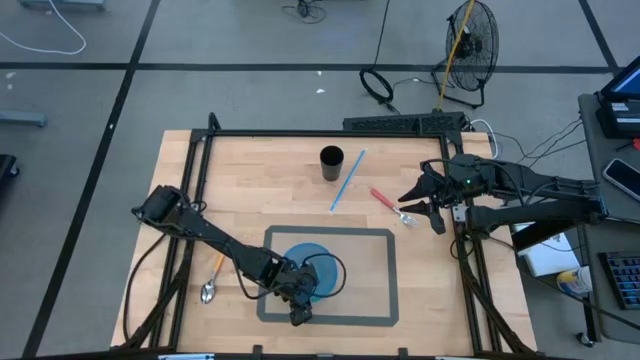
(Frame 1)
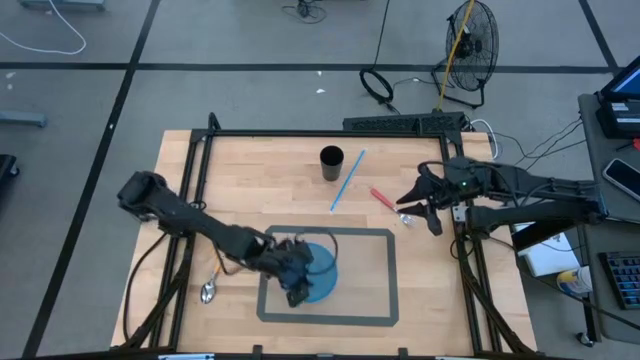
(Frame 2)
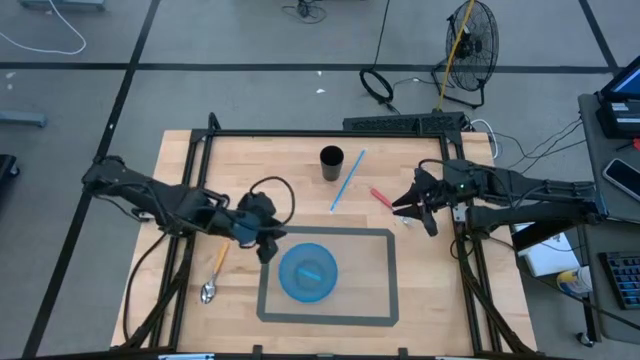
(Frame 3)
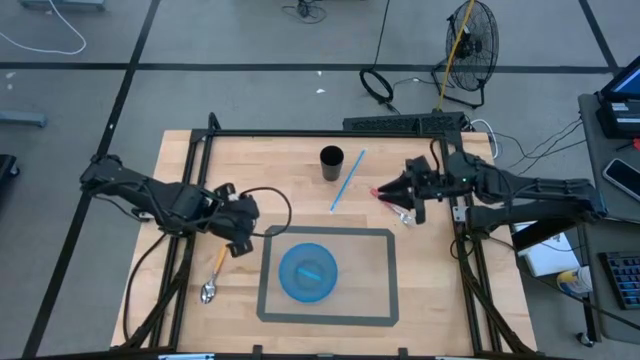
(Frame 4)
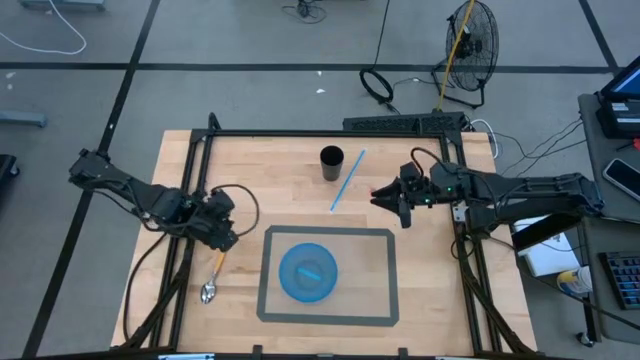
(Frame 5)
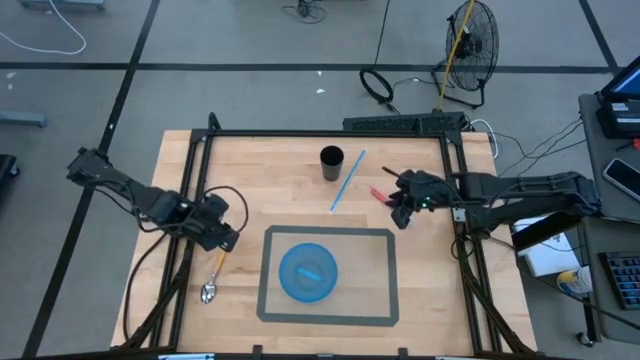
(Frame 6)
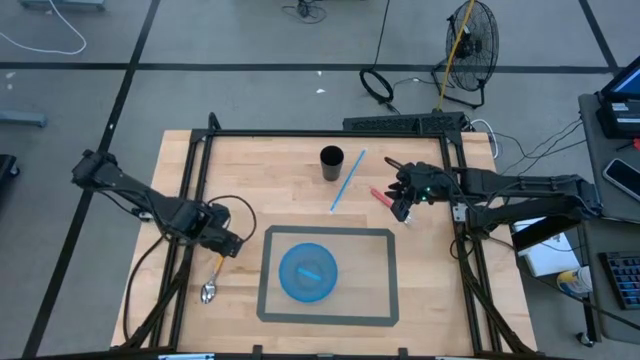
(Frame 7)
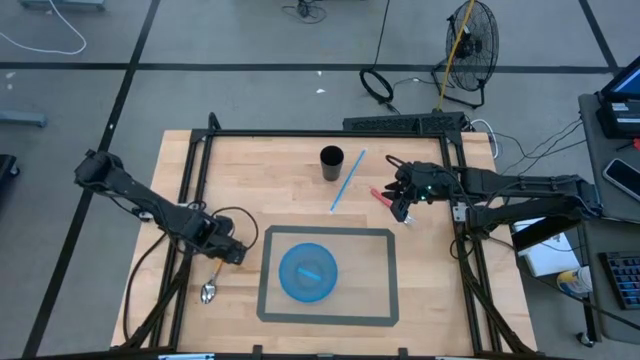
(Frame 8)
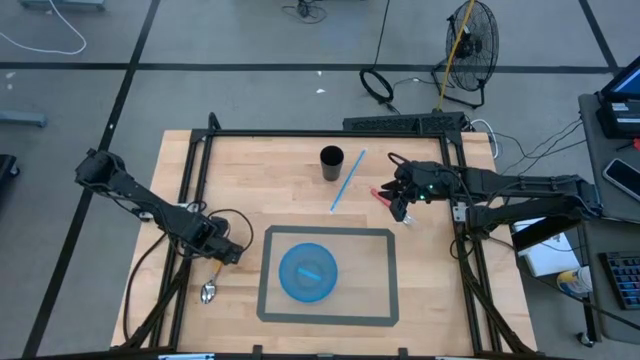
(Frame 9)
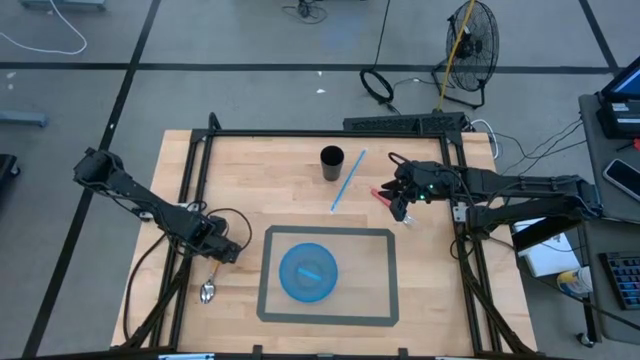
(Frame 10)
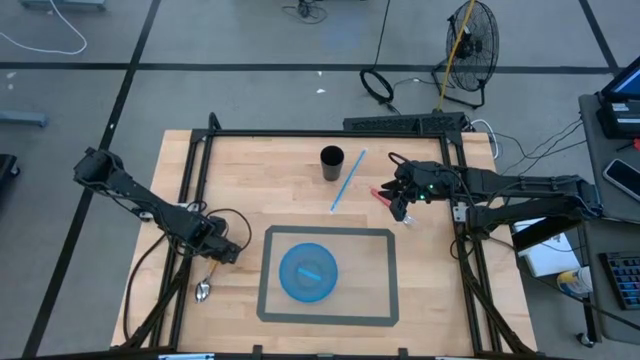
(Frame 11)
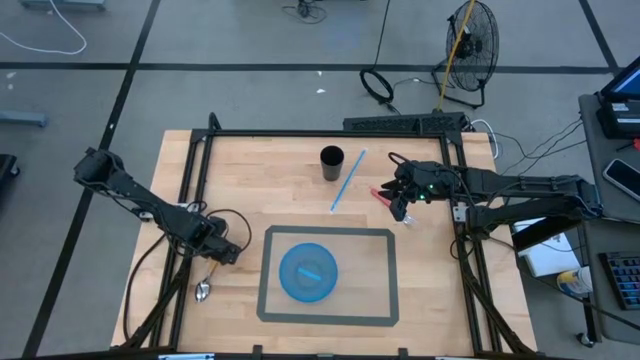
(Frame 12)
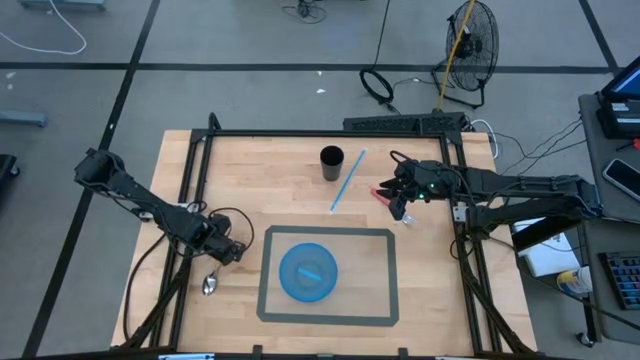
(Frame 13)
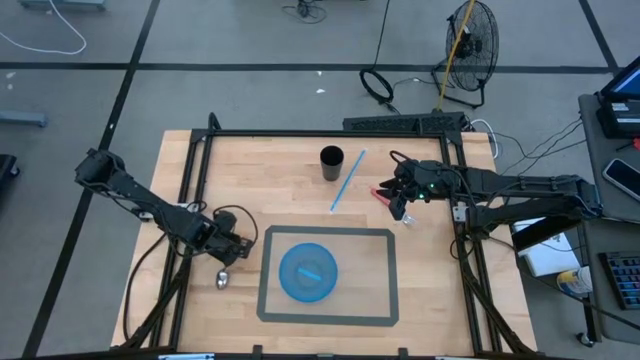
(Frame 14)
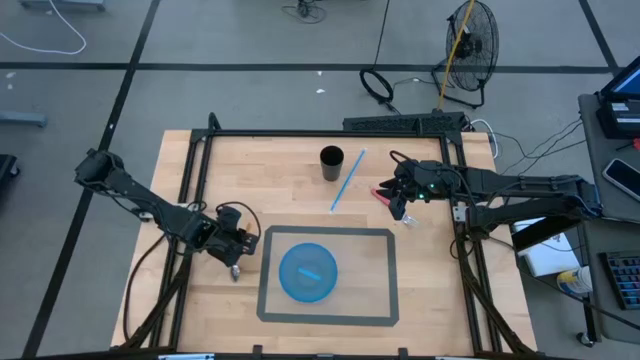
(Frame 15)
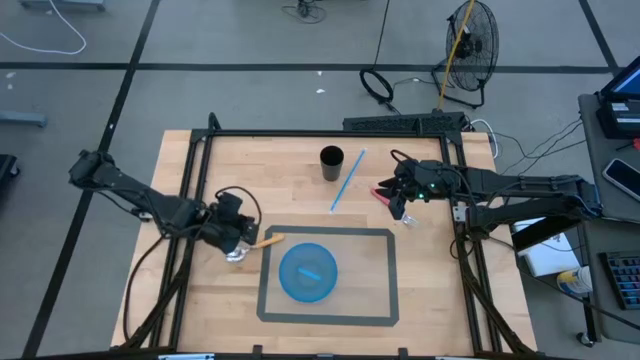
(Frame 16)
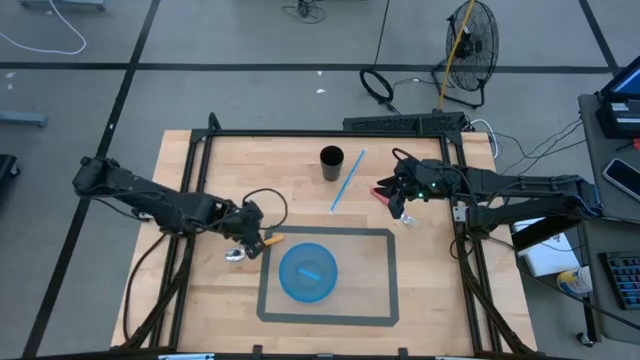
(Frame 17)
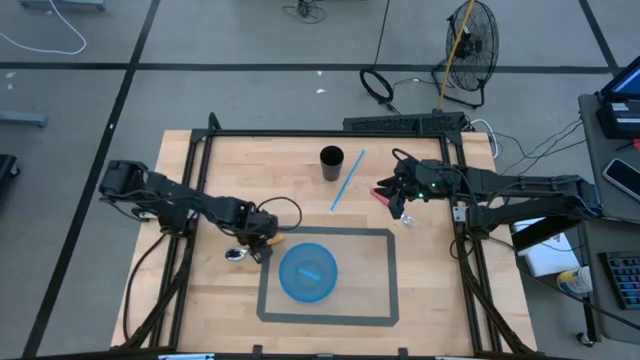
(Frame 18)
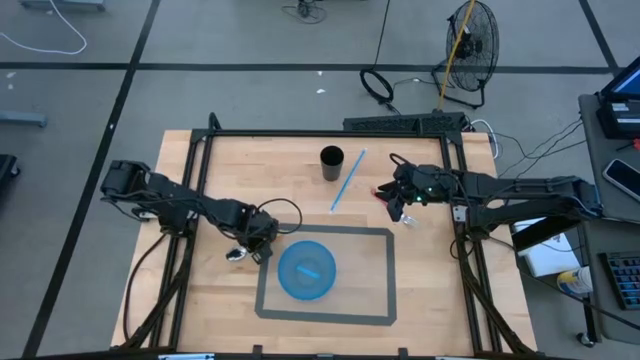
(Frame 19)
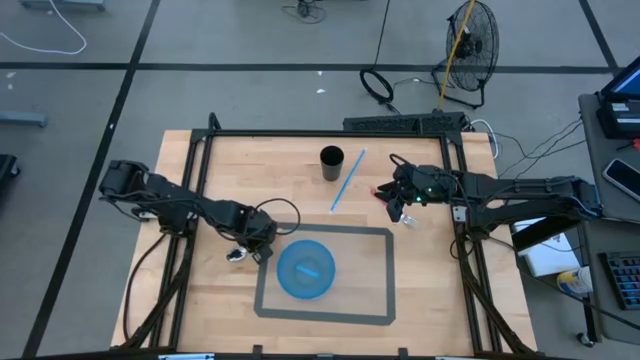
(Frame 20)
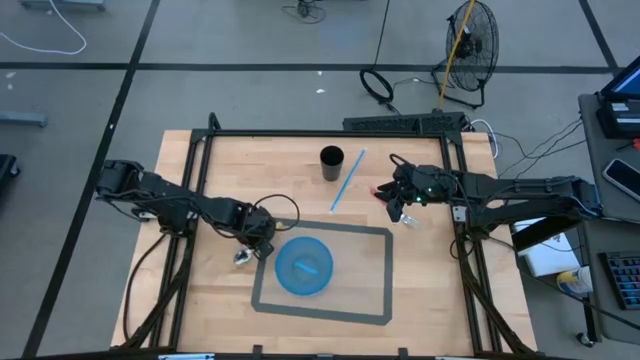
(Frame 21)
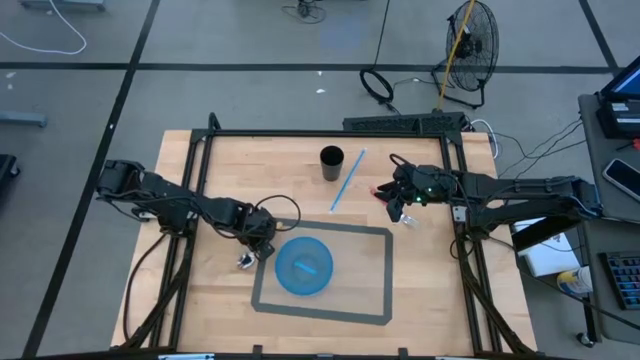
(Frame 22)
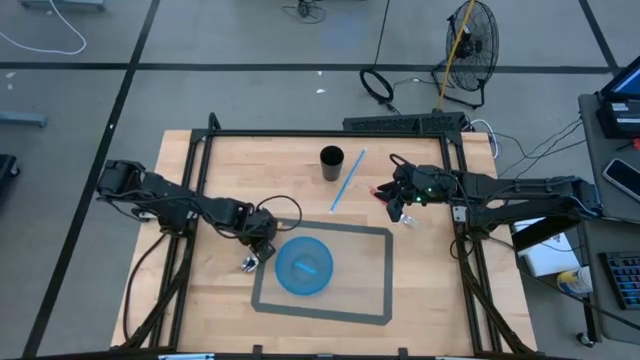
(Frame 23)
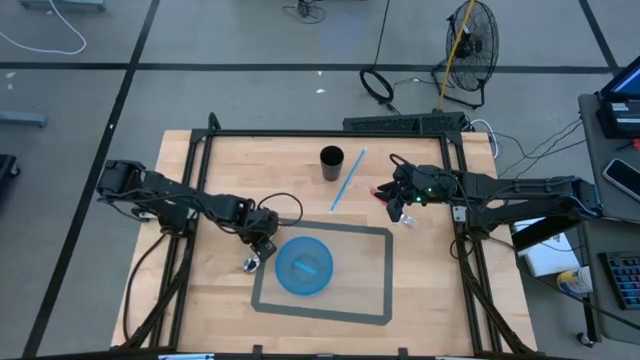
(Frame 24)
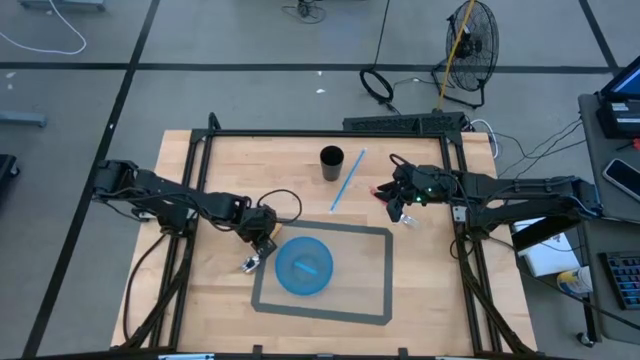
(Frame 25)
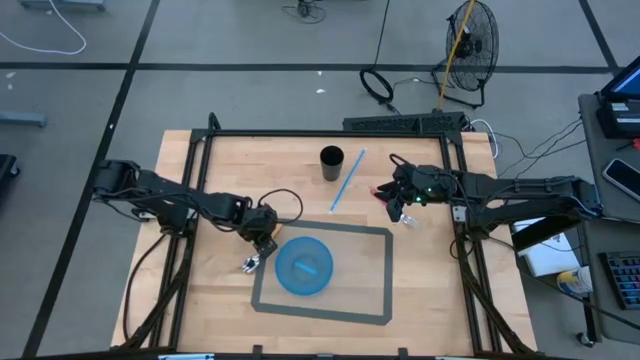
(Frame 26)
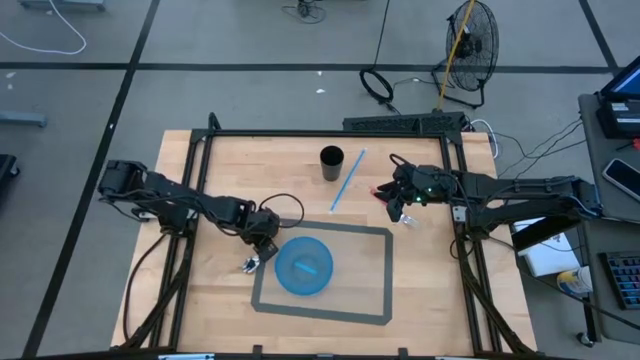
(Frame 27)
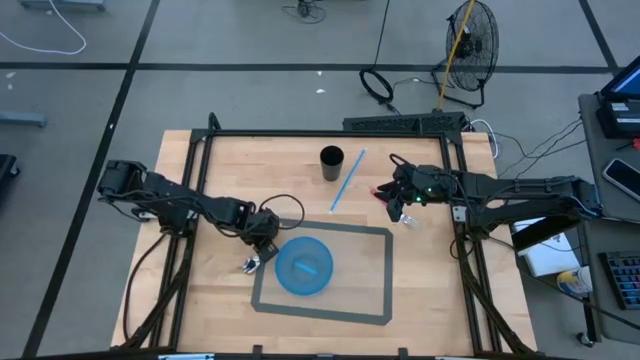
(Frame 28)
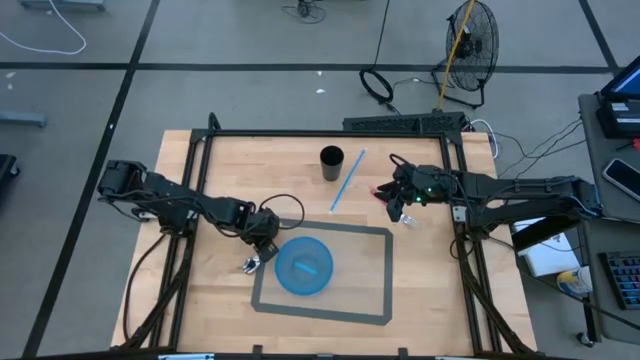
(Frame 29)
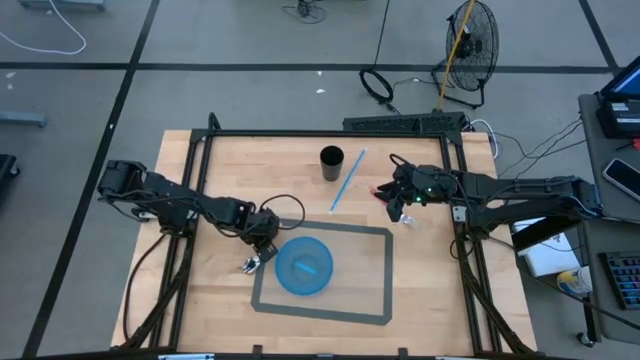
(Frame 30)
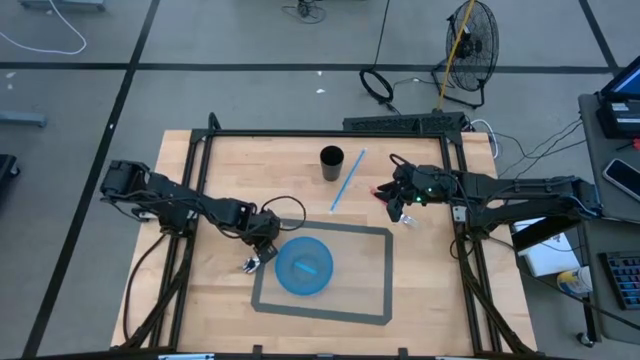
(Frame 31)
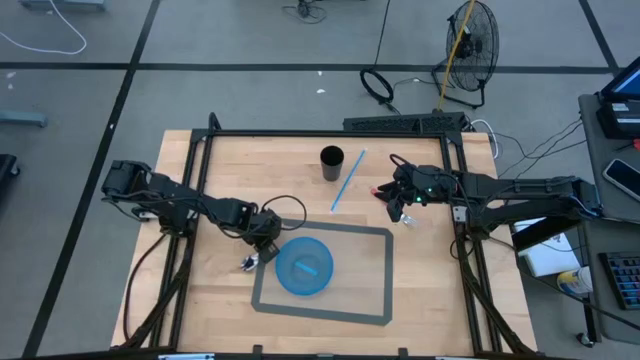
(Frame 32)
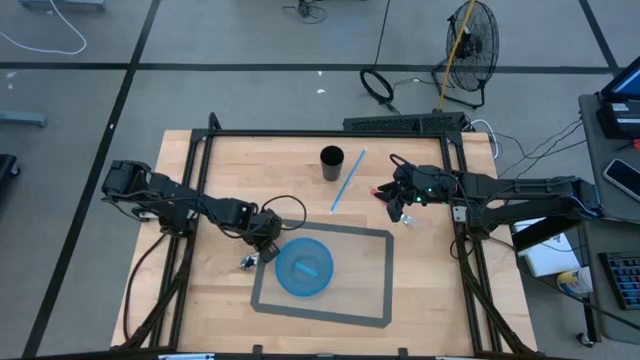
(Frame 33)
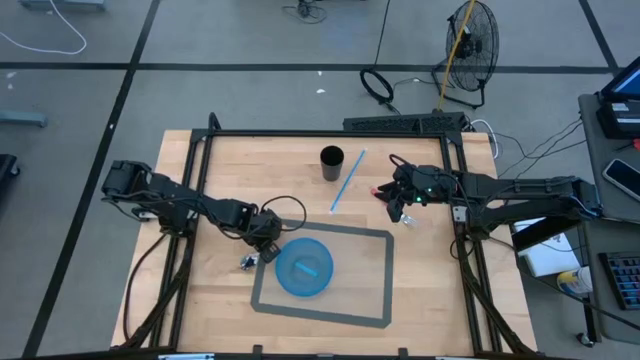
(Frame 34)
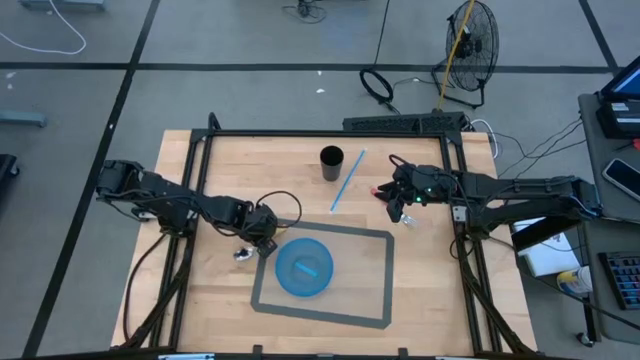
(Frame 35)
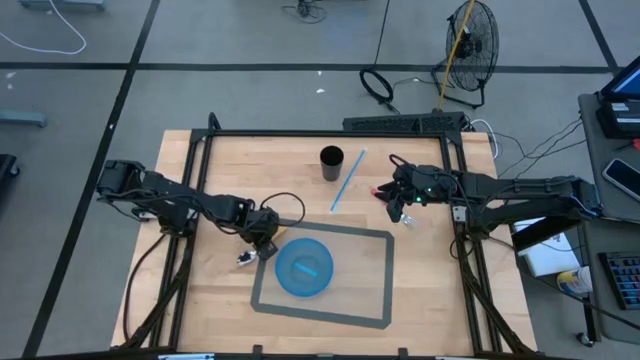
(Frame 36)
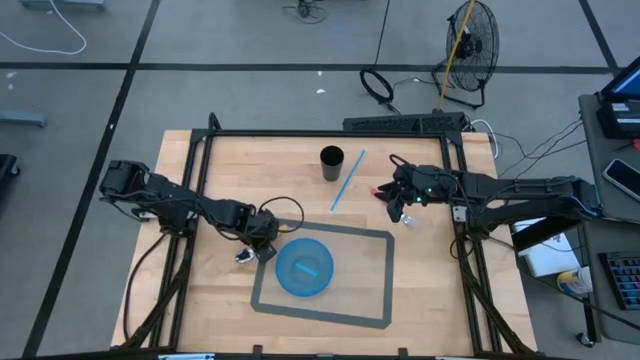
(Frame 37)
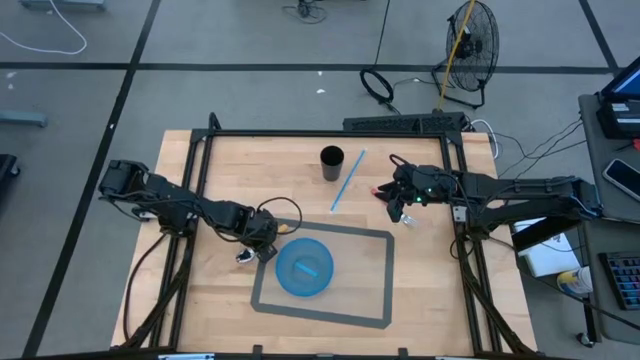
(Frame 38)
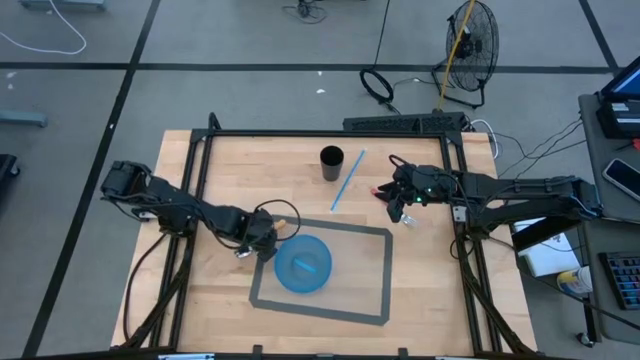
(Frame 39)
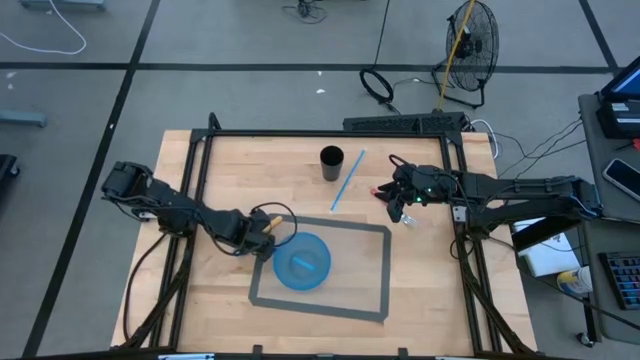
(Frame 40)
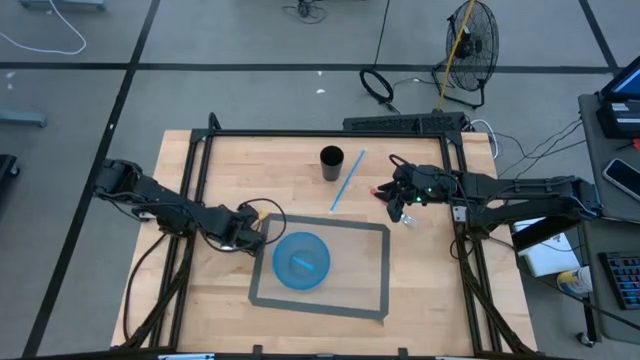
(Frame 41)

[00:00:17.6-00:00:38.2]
Task: Pick & Place Utensil
Put the yellow spoon into the blue bowl
